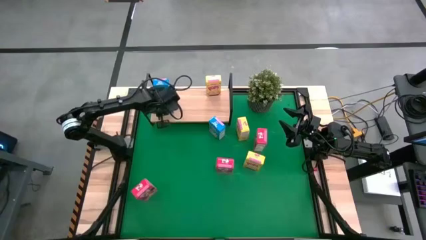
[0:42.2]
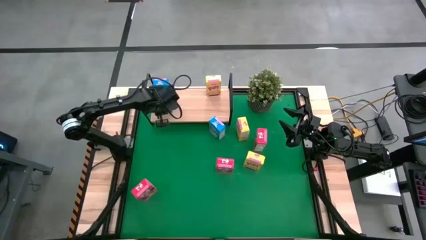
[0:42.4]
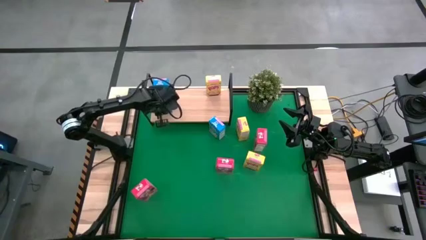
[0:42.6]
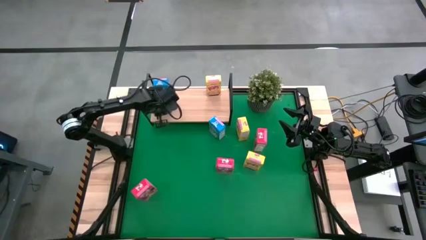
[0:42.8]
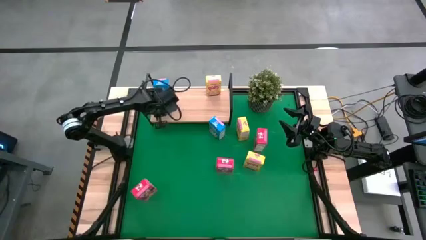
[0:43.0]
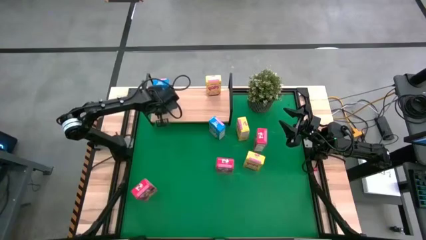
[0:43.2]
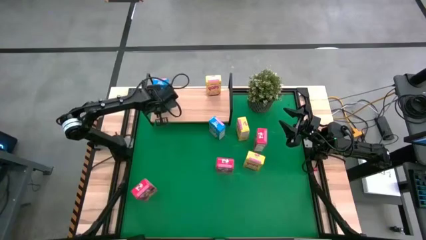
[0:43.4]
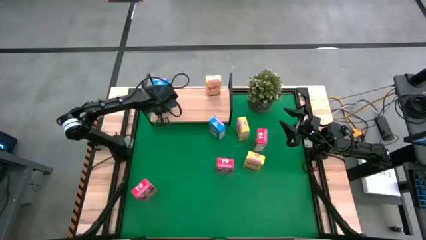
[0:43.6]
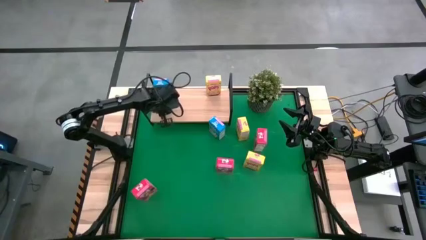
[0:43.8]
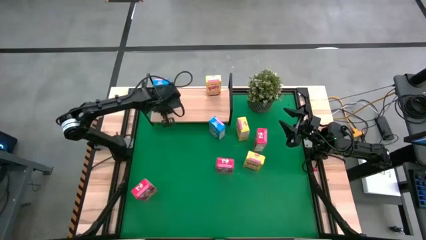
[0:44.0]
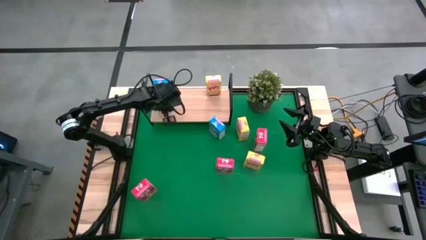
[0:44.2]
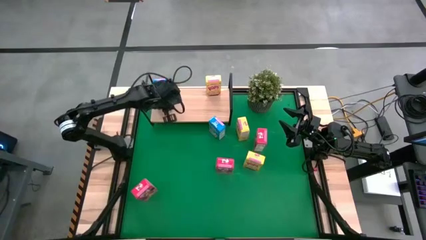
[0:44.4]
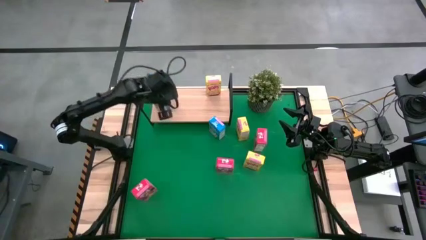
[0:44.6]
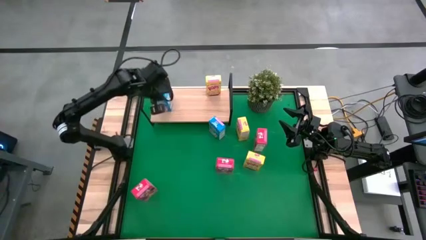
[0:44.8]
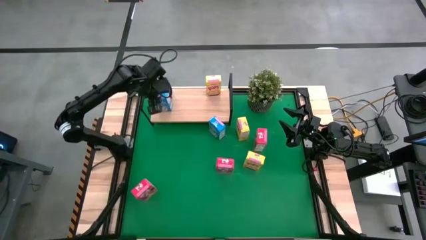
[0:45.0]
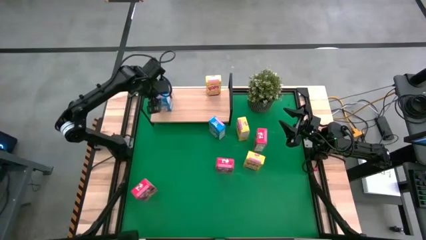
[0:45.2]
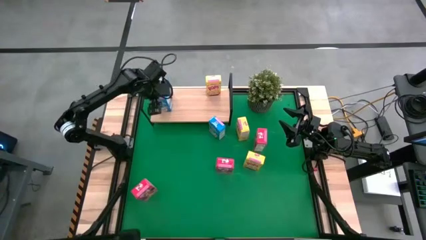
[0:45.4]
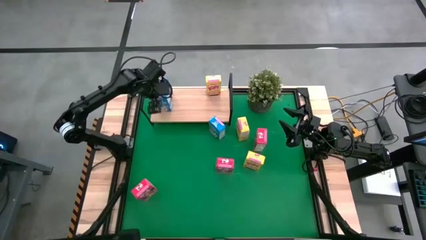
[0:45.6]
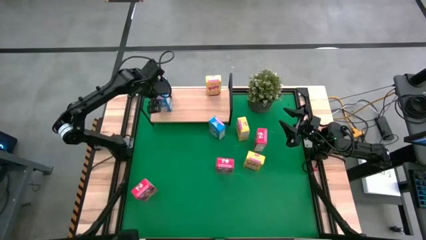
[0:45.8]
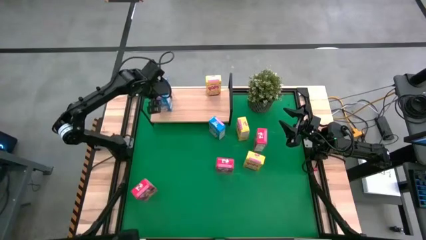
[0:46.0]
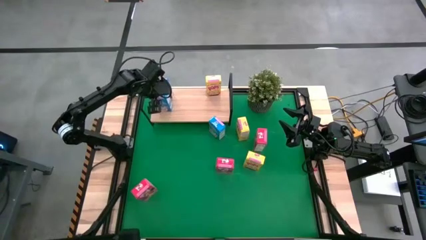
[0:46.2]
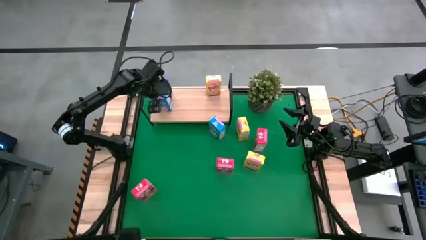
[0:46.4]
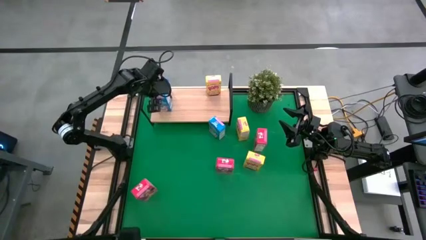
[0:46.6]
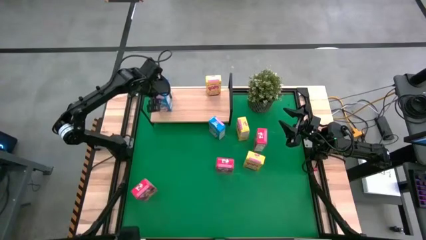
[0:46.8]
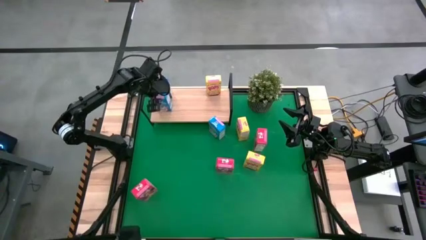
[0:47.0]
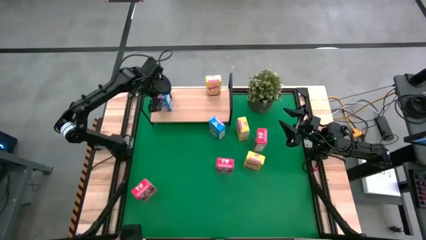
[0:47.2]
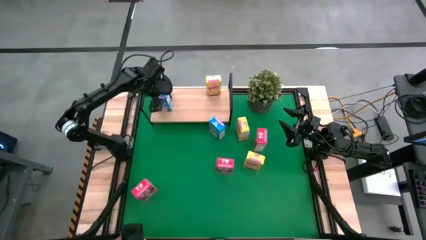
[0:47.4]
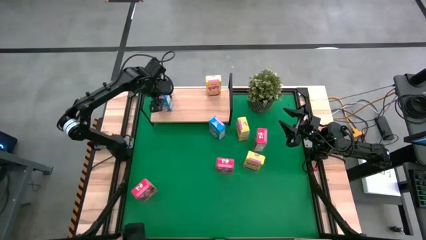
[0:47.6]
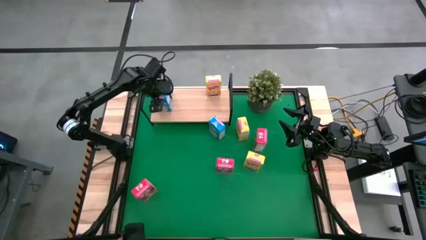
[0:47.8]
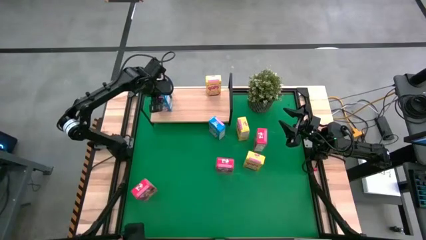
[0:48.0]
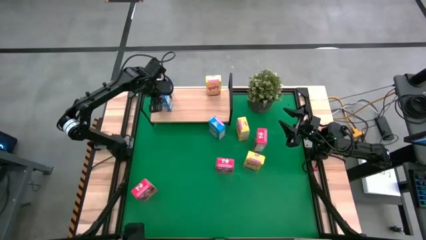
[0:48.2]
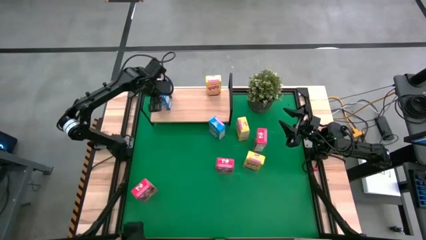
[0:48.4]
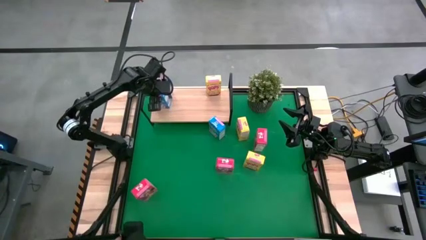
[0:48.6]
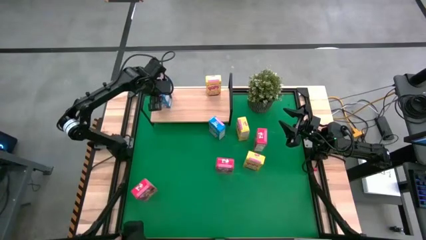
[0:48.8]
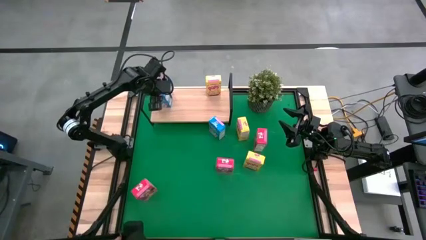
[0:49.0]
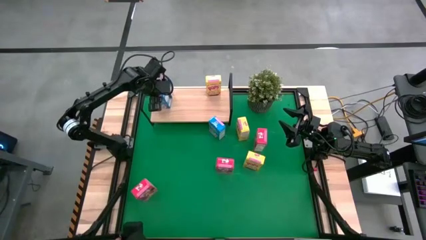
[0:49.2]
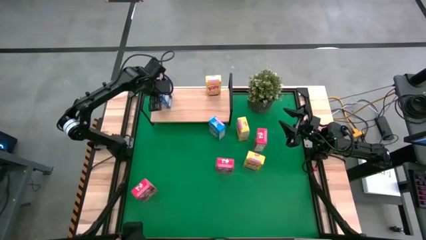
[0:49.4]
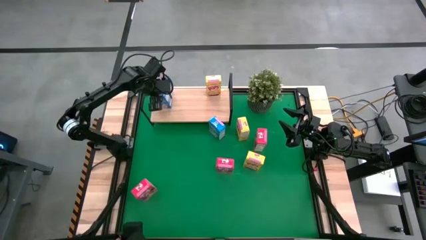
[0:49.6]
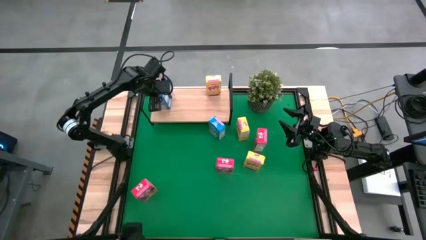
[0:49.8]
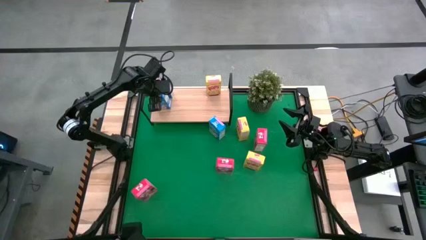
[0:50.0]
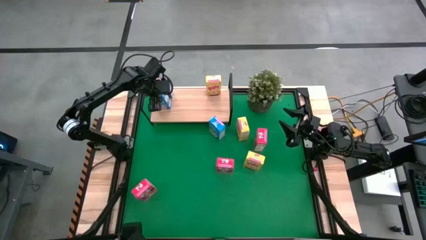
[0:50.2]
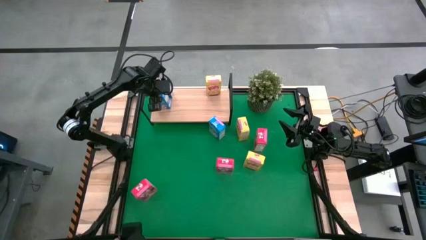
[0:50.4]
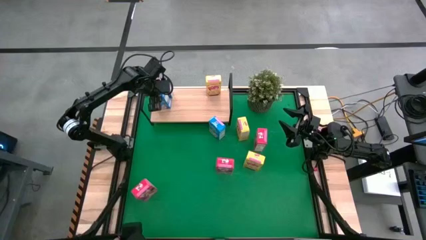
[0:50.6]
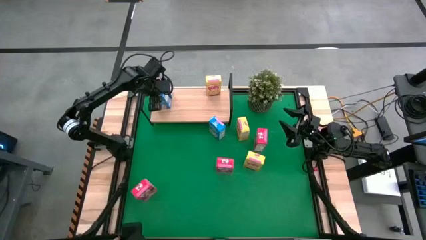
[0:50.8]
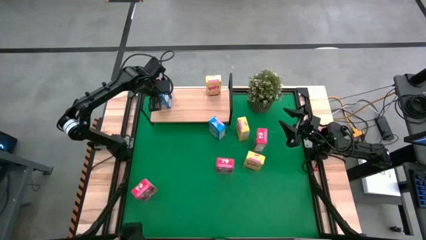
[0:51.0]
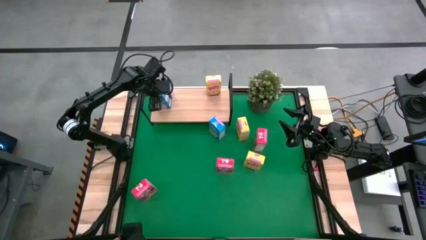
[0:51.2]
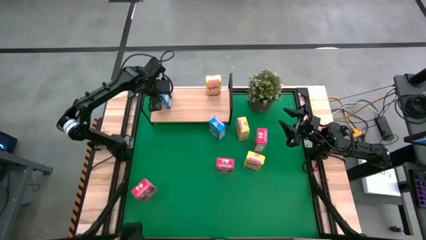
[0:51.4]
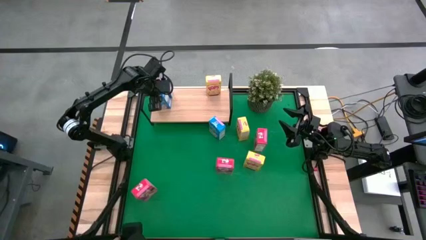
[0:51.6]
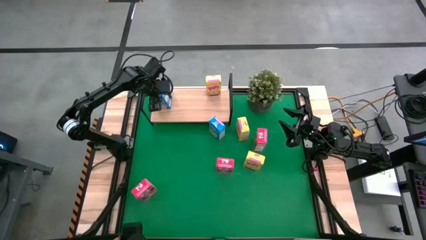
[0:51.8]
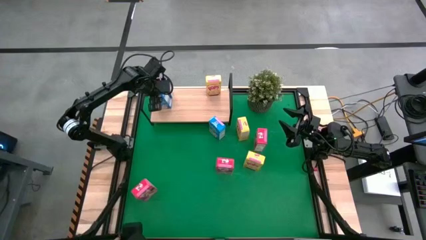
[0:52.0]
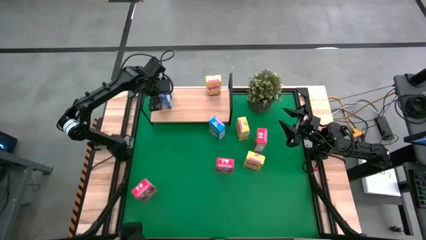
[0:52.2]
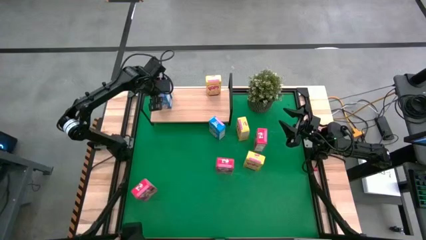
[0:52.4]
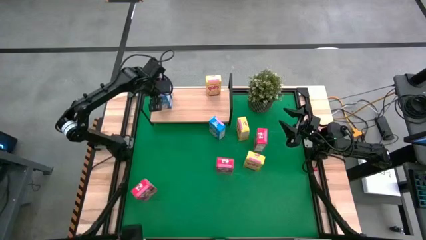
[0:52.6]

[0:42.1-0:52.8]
Task: Stack cereal on shelf
Put the bottom blue cereal box aligned with the other blue cereal box on the shelf

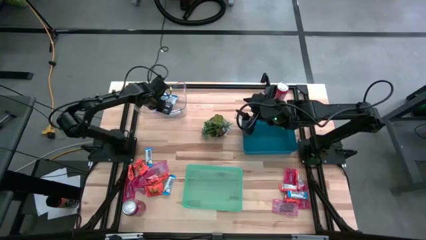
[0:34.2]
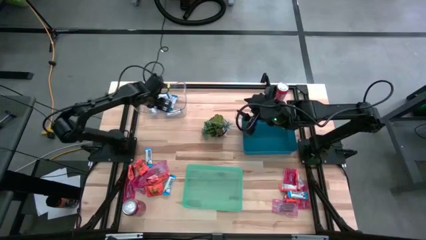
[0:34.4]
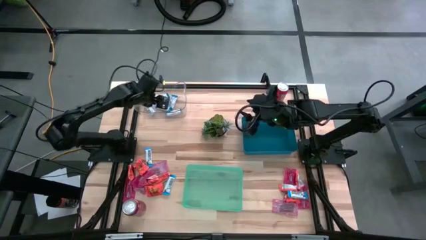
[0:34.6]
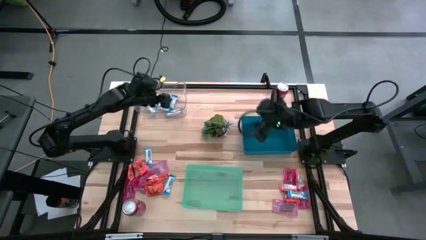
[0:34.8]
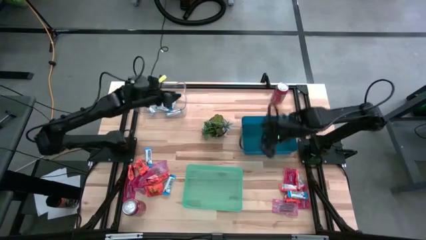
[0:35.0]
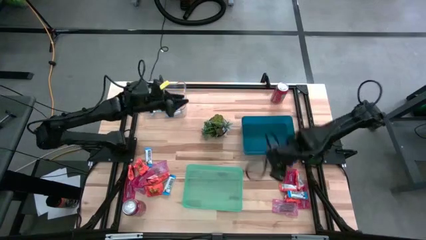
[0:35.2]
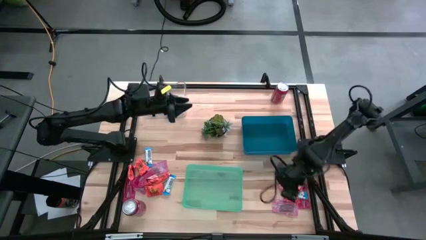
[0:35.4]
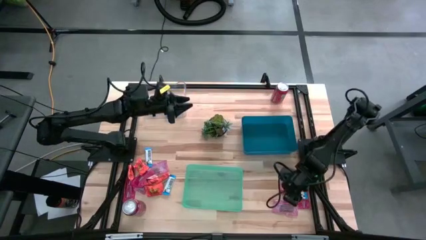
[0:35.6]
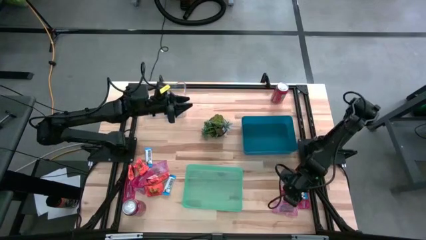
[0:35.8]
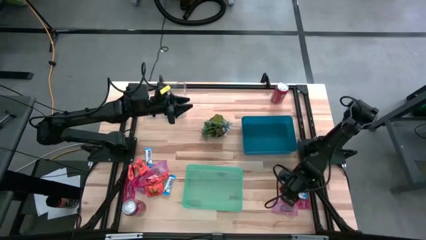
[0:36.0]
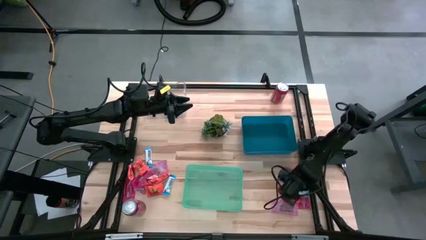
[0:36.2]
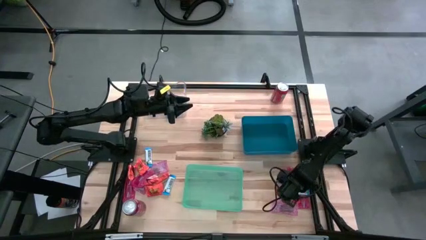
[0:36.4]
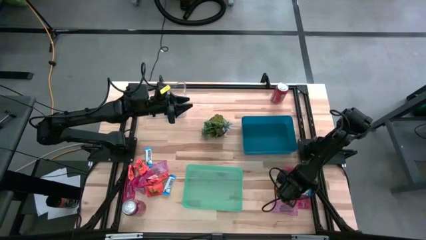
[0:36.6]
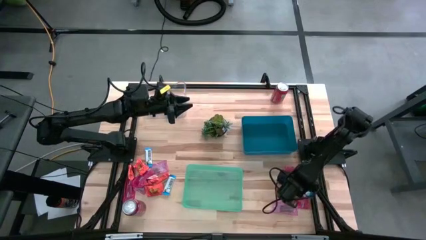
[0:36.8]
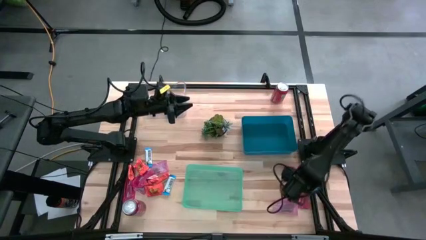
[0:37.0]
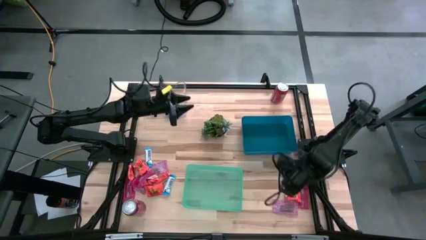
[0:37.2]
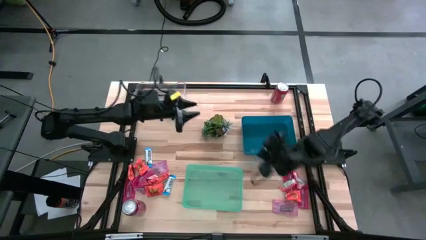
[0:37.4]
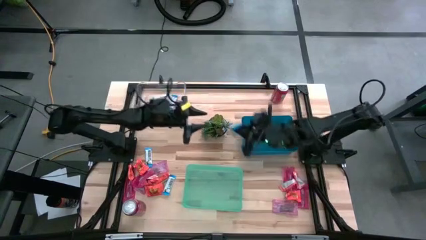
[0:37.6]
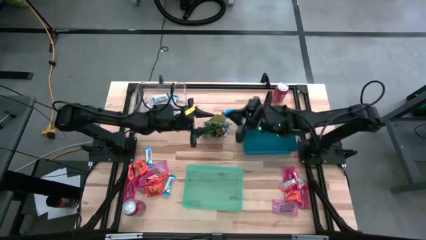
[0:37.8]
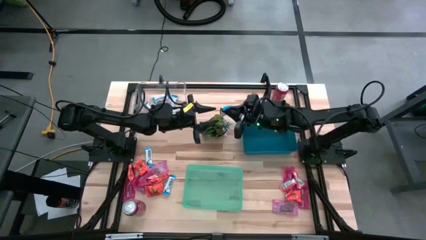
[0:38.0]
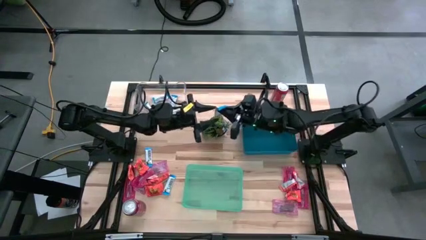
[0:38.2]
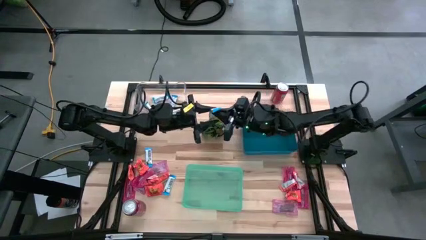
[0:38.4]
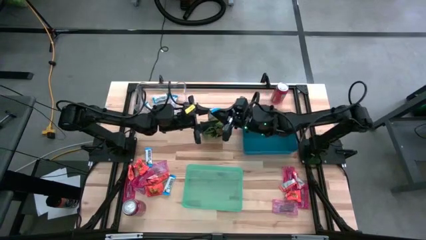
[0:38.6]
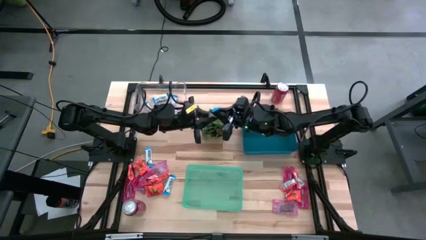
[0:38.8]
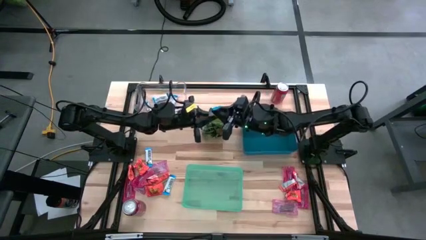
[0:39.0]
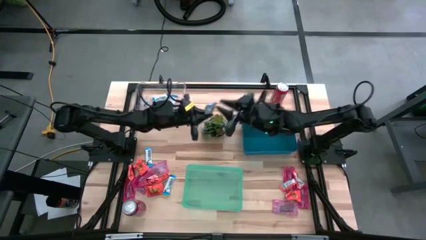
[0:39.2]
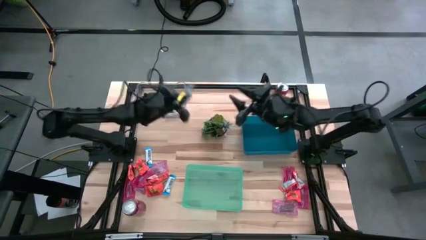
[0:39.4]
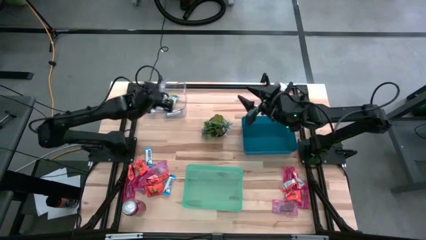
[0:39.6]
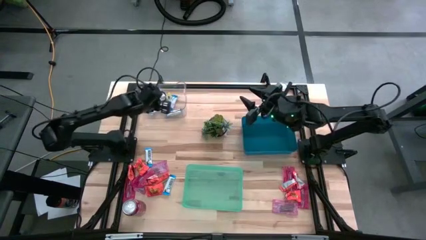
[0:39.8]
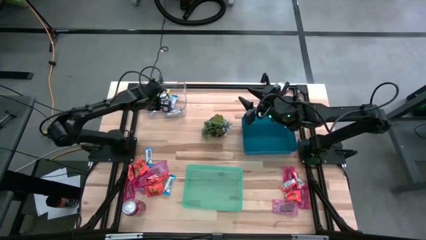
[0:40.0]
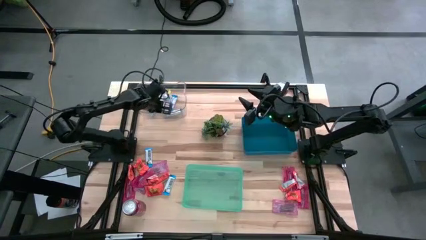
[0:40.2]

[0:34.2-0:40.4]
Task: Sort candy
Put the white chocolate bar into the transparent bin
